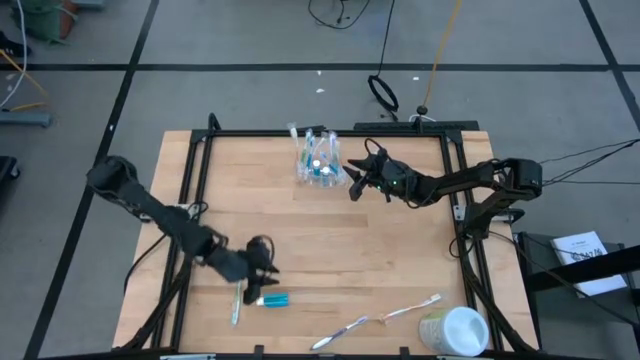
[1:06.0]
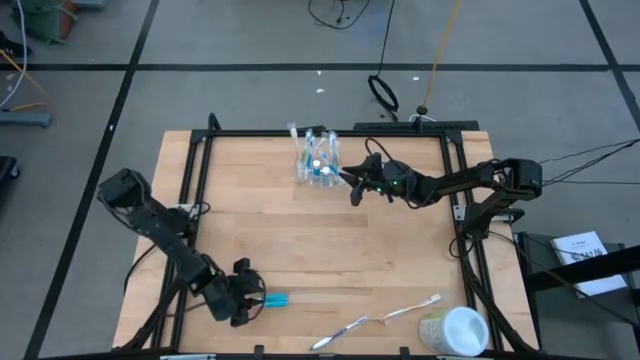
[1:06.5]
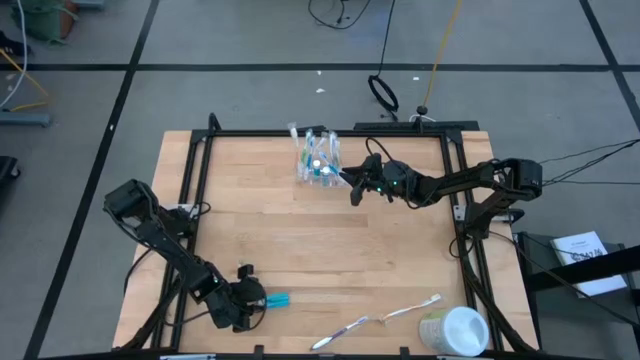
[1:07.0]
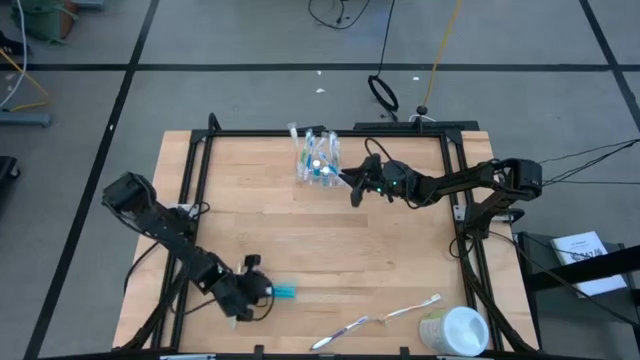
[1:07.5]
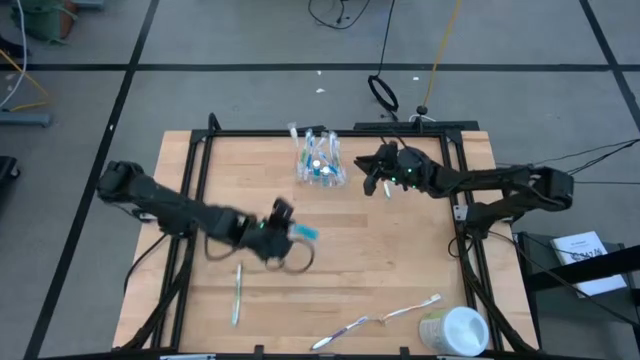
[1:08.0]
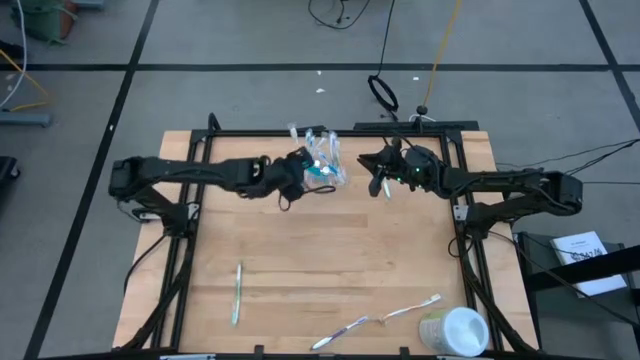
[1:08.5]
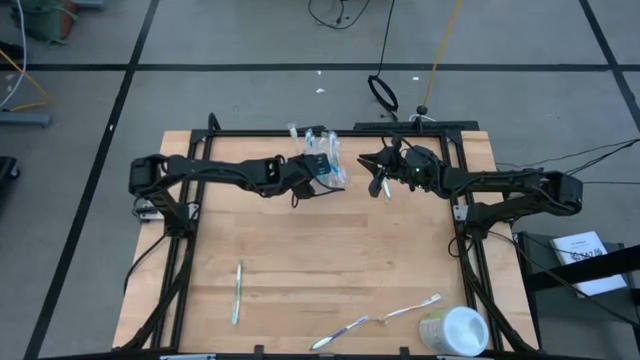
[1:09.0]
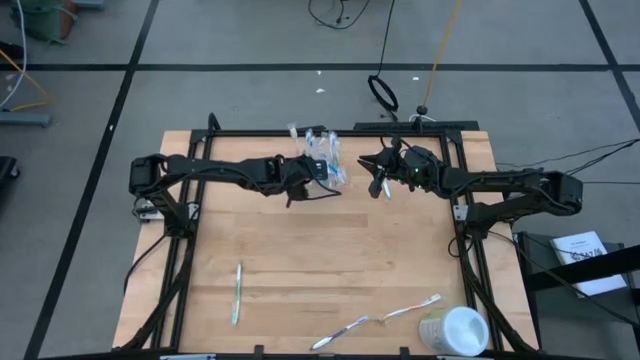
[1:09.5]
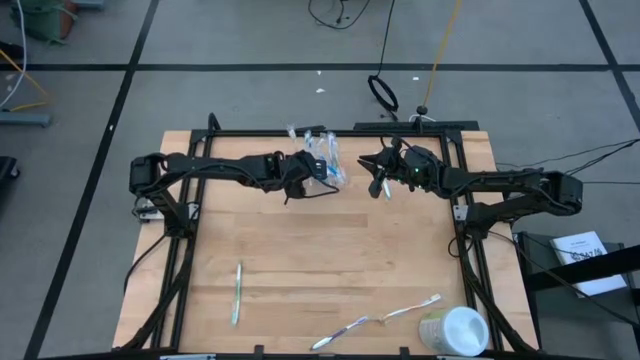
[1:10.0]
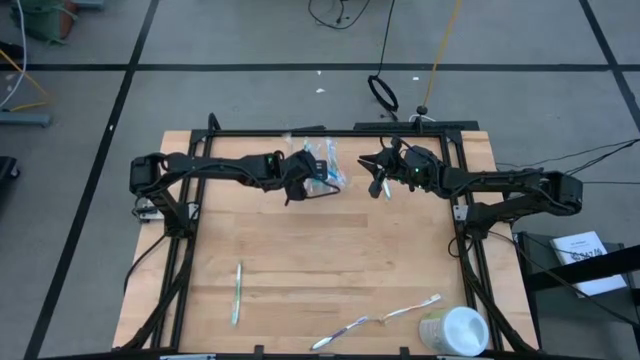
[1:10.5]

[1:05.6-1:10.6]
Task: Pick & Place toothbrushing station
Put the blue mouthwash into the transparent organizer

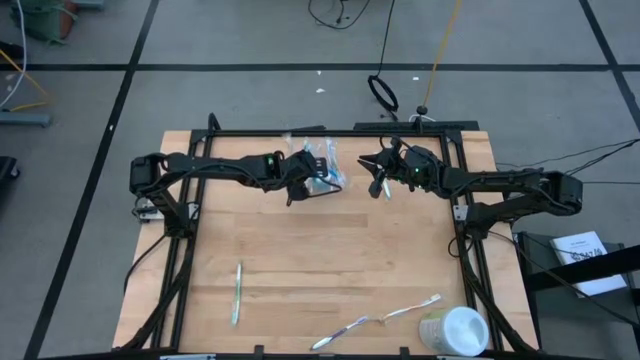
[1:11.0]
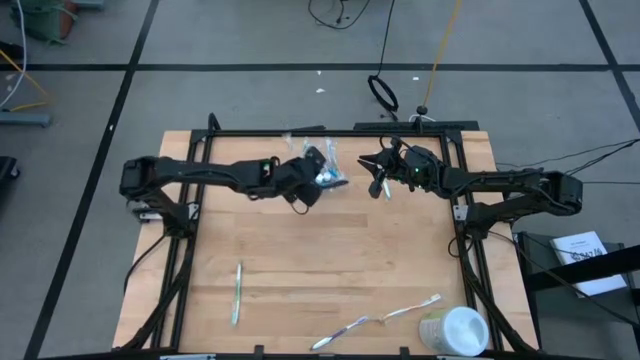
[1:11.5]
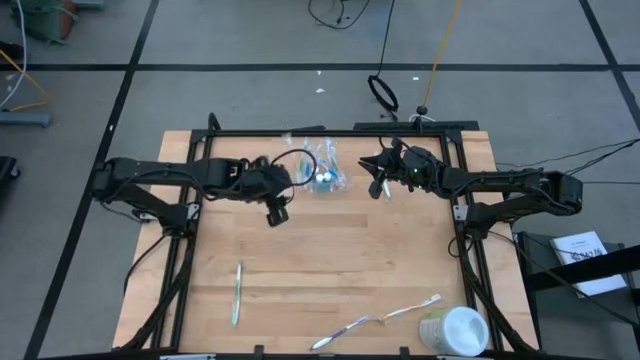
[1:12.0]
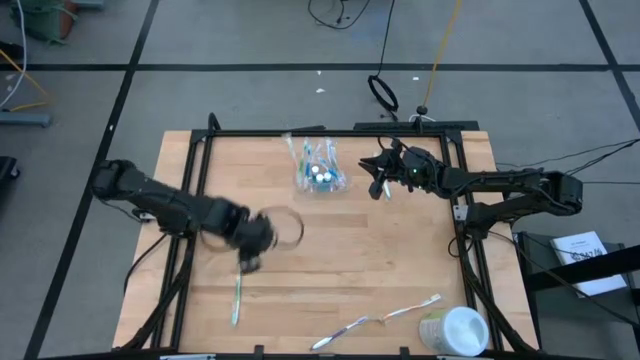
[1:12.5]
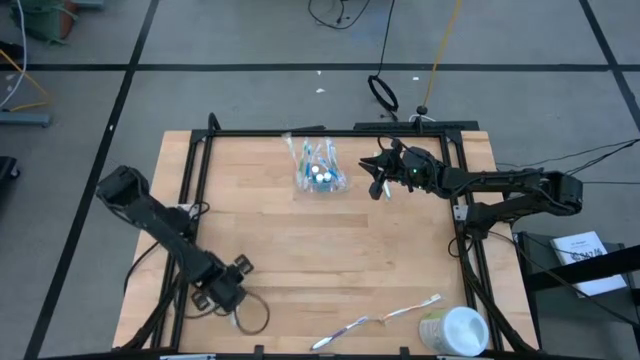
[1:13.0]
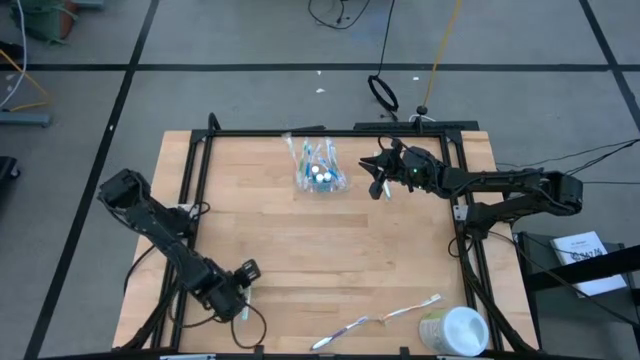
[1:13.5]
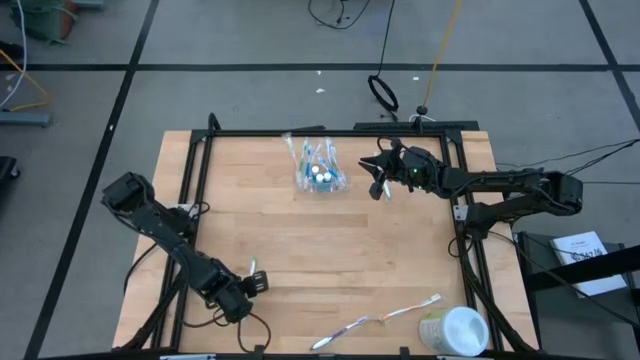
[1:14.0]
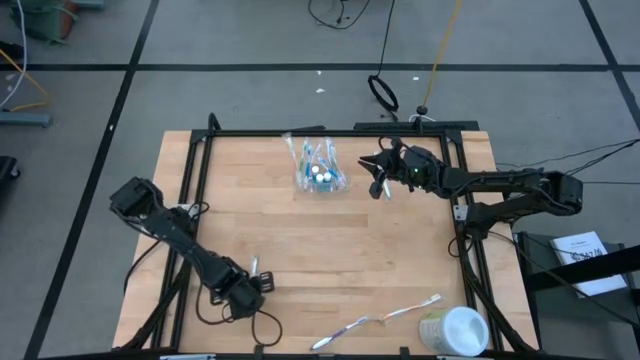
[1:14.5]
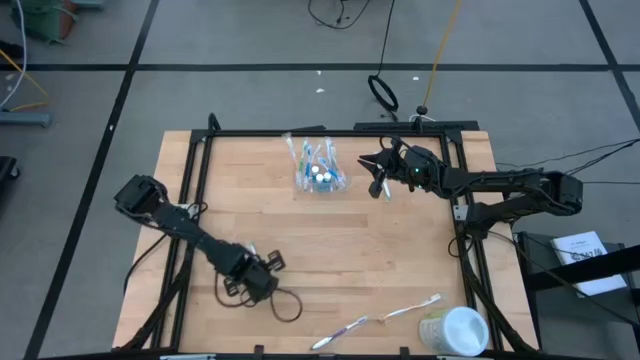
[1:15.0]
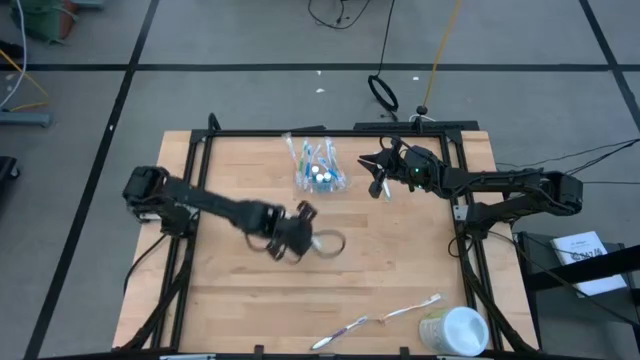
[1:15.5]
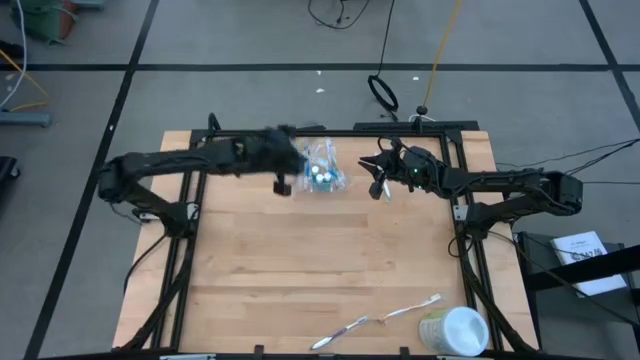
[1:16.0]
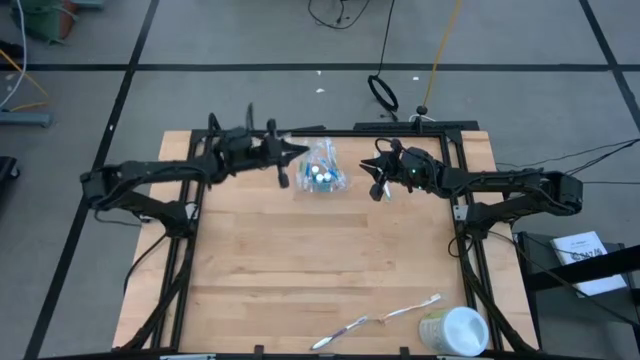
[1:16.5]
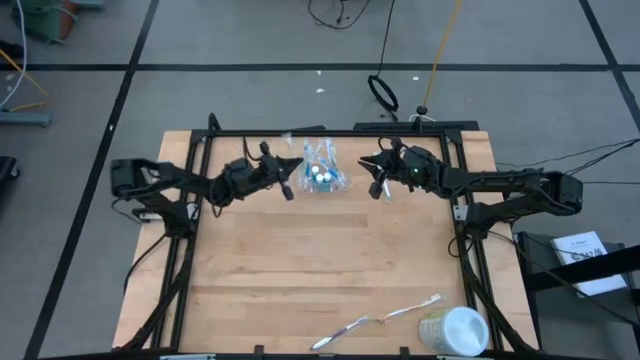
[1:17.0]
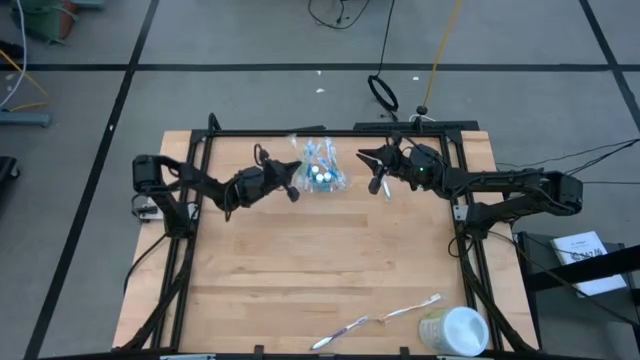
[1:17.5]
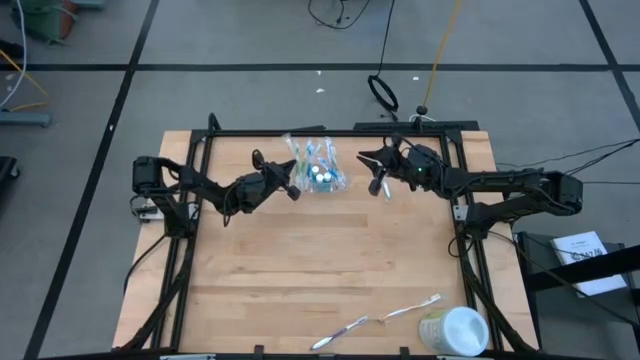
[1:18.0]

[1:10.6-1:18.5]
Put the green toothbrush into the transparent organizer

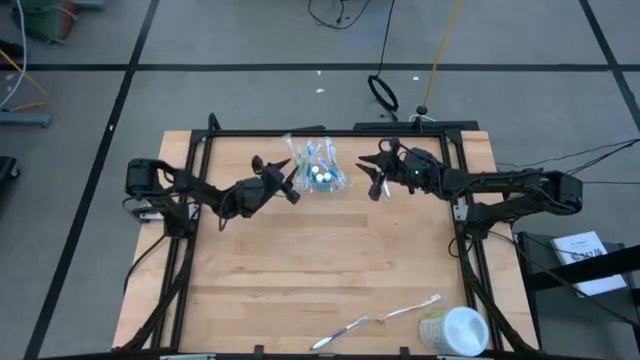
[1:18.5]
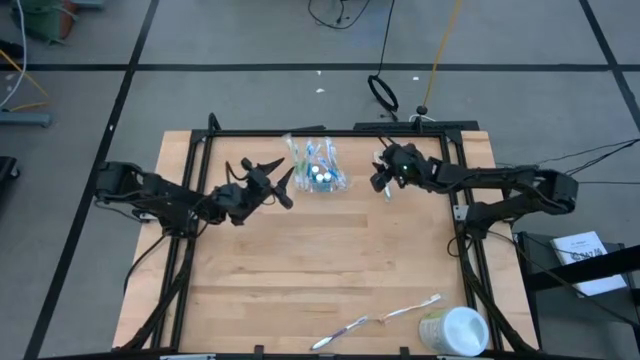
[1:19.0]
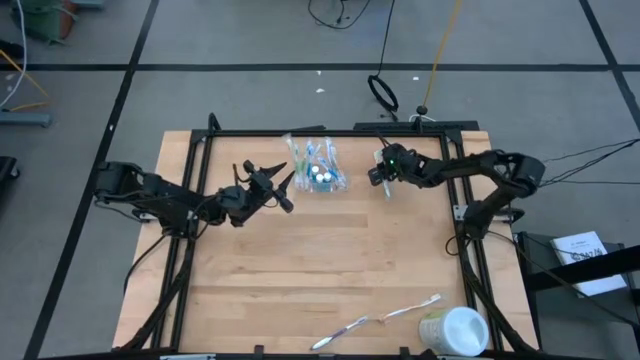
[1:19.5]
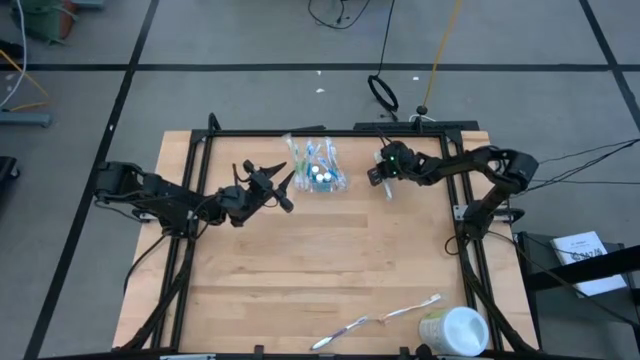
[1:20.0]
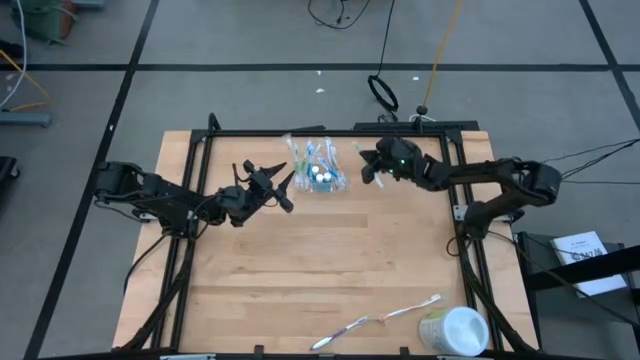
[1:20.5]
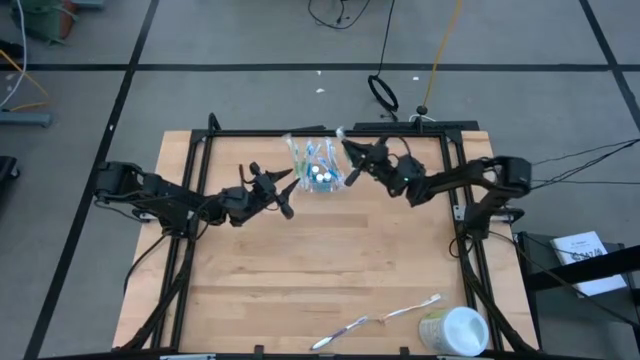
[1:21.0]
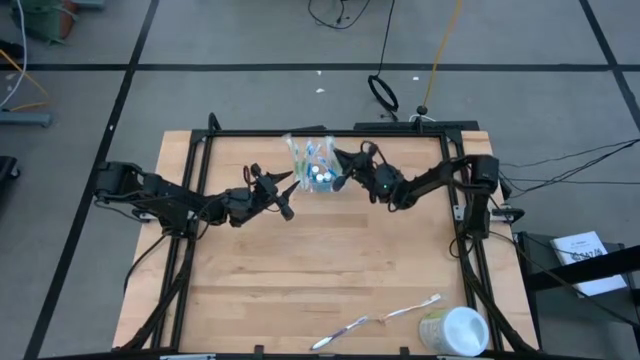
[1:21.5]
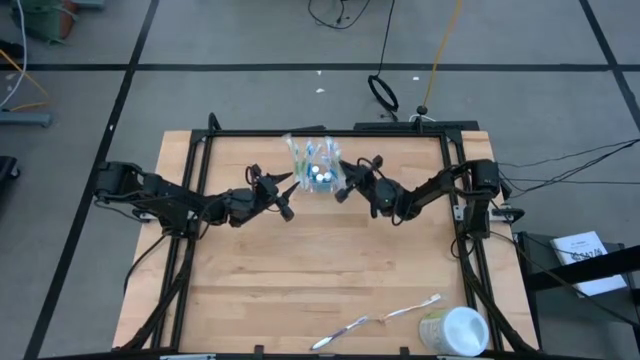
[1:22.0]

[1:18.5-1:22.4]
Put the green toothbrush into the transparent organizer

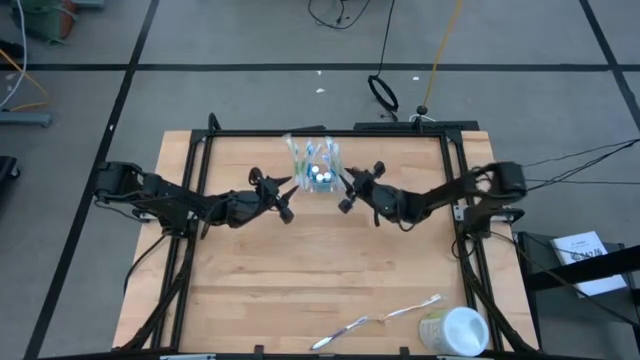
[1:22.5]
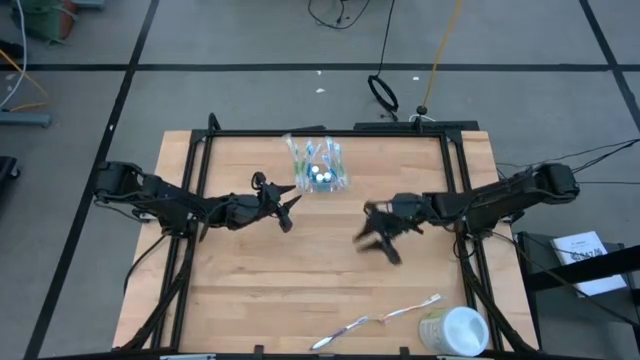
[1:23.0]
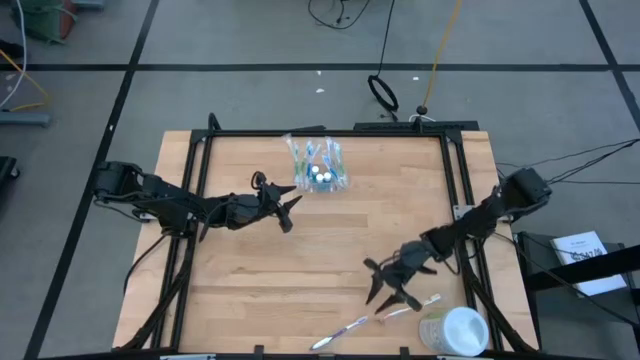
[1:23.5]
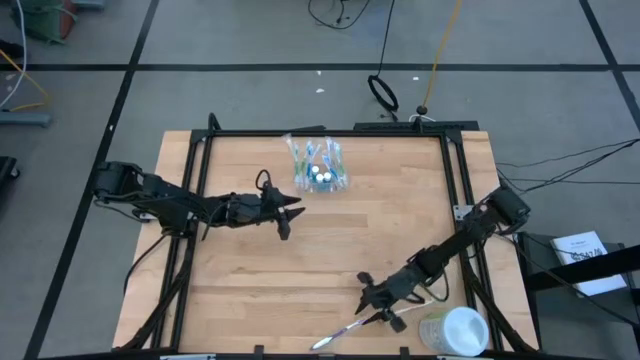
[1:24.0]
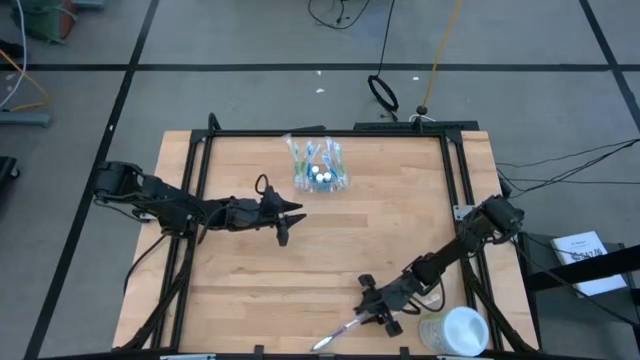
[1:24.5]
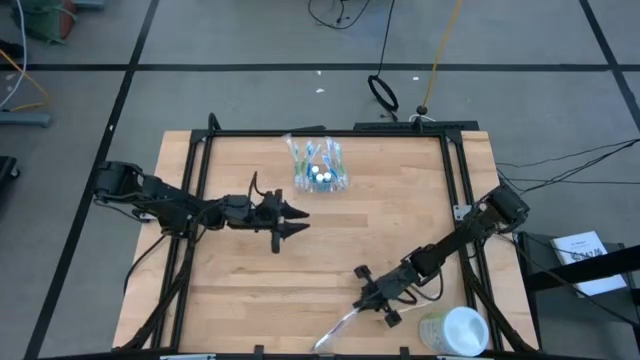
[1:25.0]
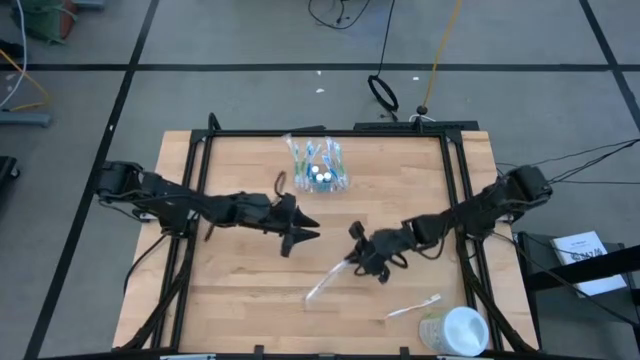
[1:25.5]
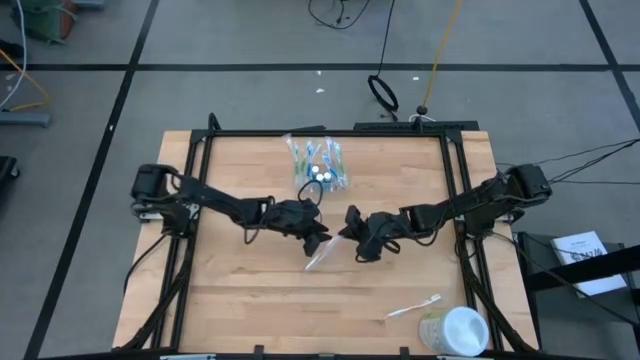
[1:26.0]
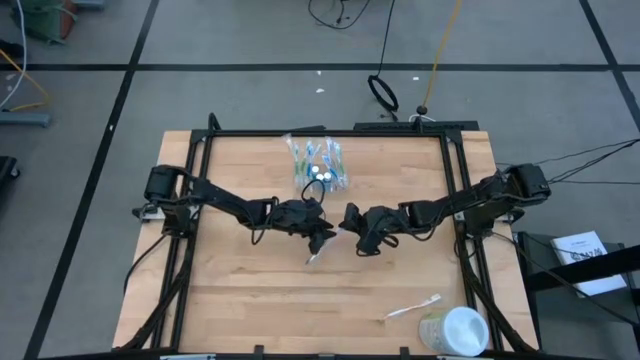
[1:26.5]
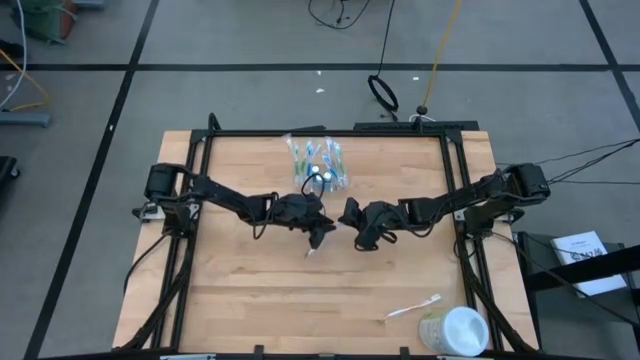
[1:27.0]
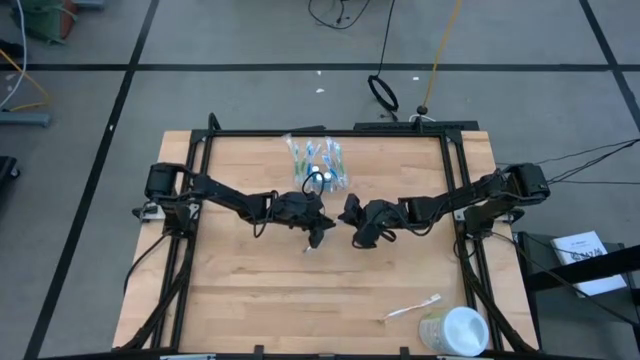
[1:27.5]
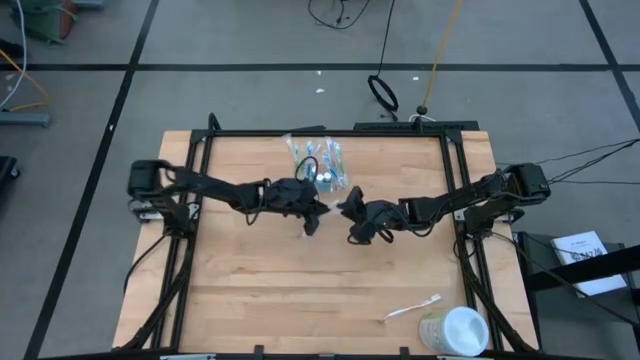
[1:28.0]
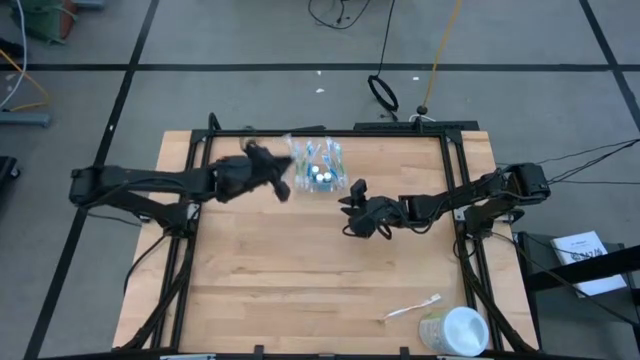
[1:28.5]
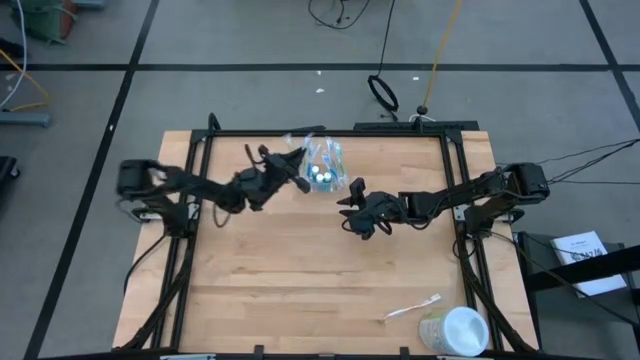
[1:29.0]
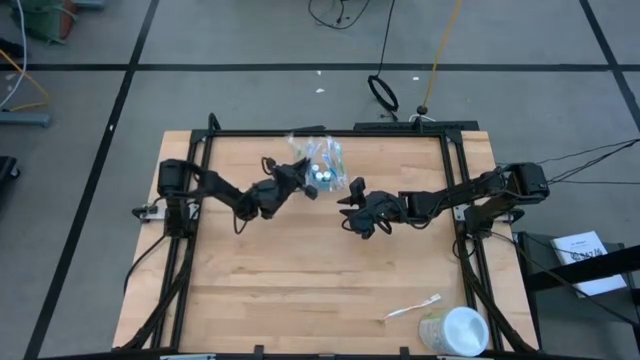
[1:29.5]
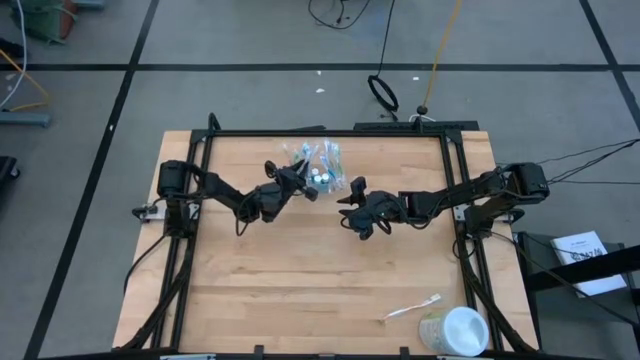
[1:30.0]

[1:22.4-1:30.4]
Put the violet toothbrush into the transparent organizer
